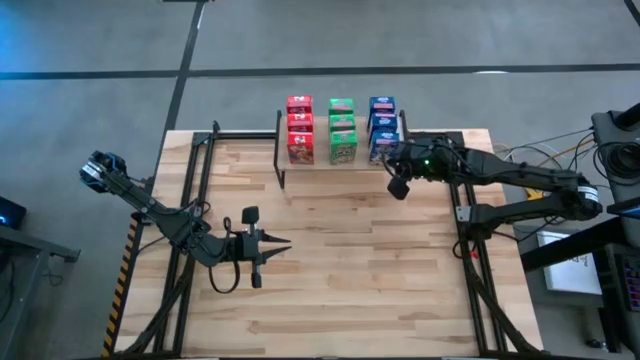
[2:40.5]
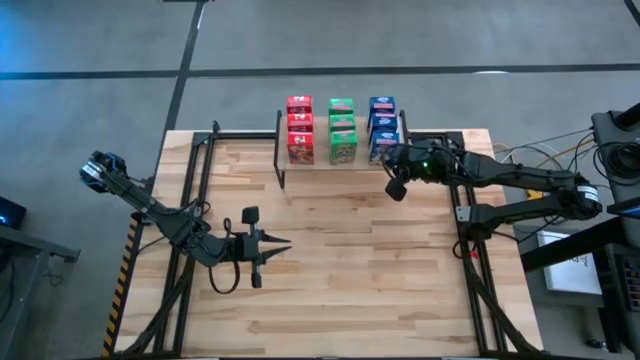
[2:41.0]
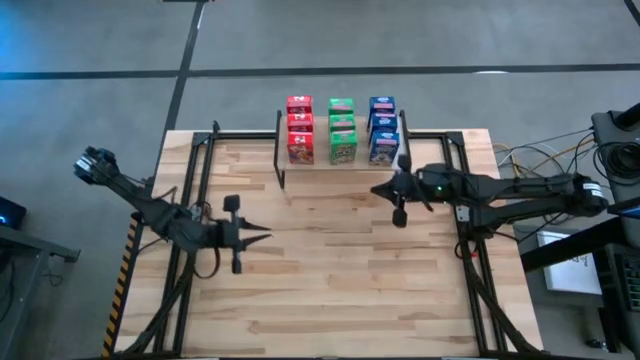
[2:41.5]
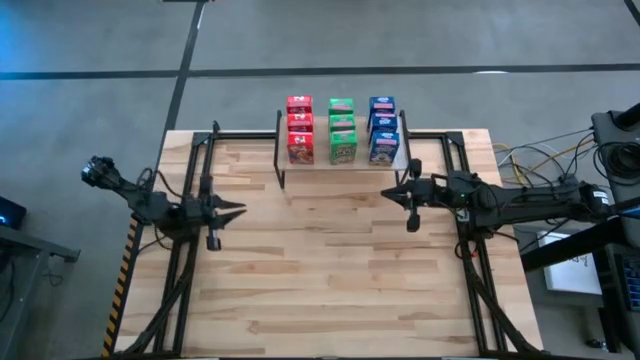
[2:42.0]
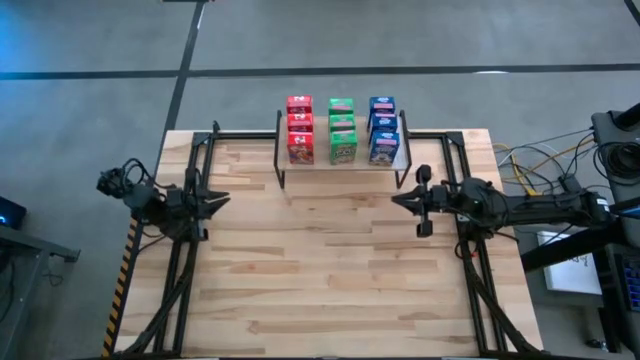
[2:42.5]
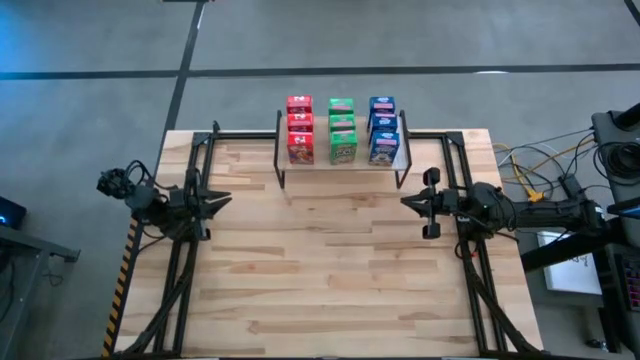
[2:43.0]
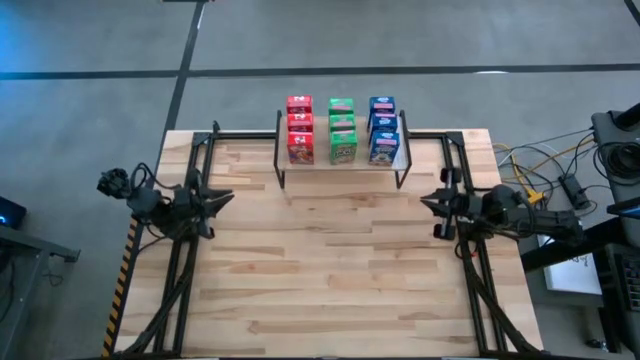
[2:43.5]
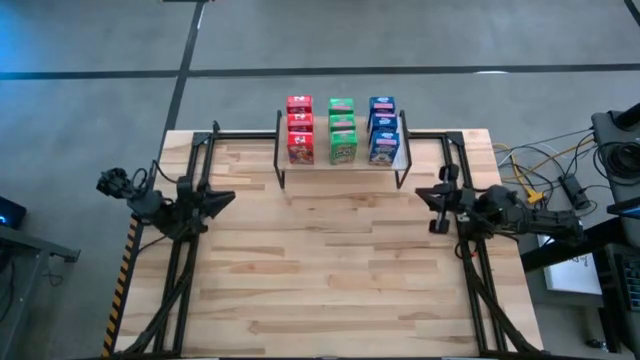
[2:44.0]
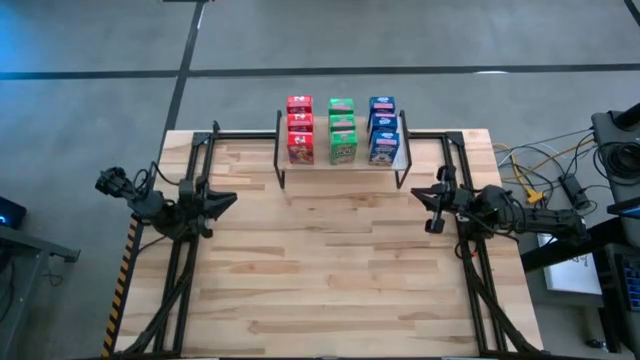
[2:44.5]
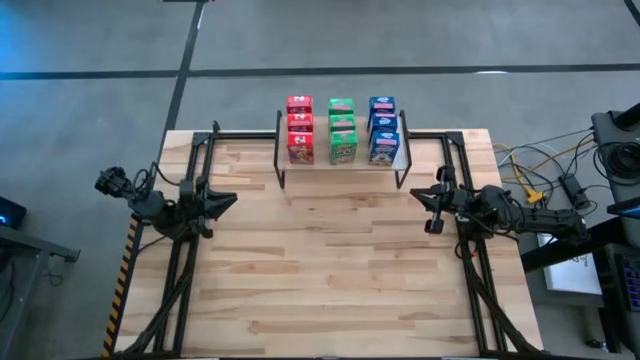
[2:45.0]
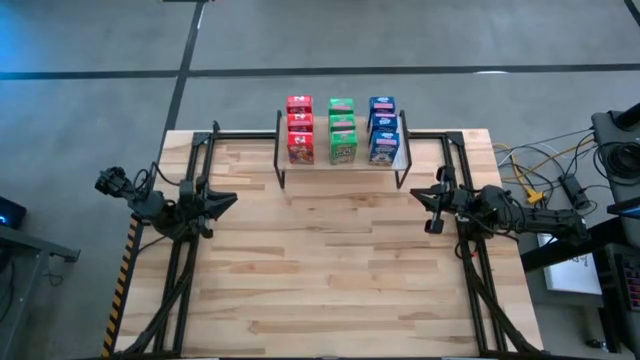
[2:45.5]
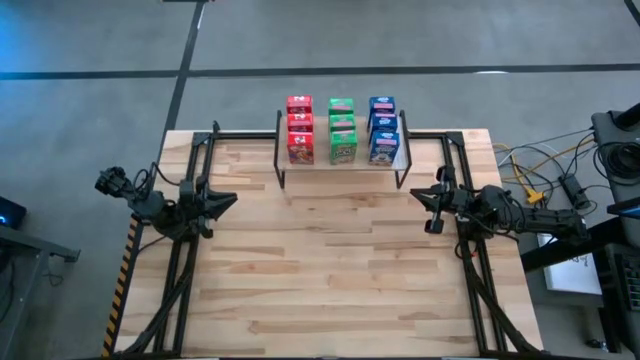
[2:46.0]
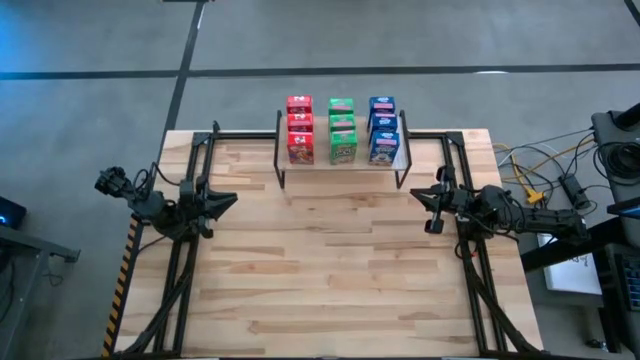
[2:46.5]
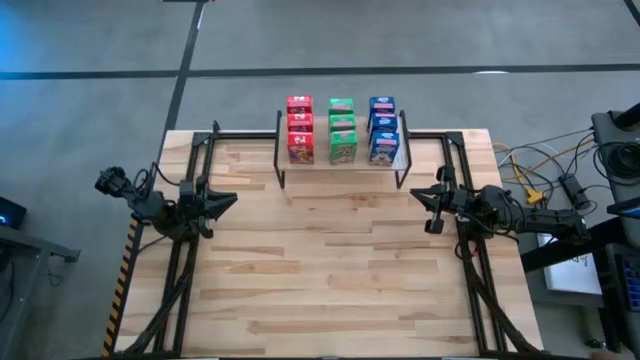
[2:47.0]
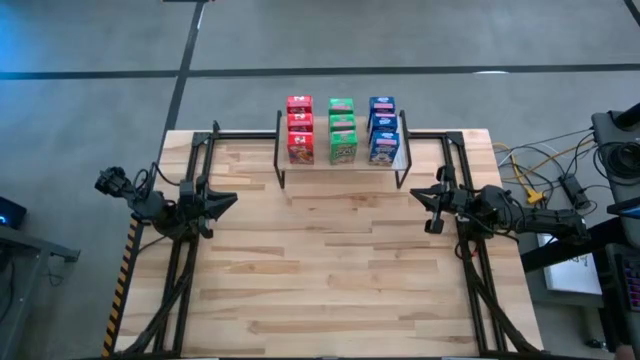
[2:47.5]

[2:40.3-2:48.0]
Task: Stack cereal on shelf
Return to Home Position

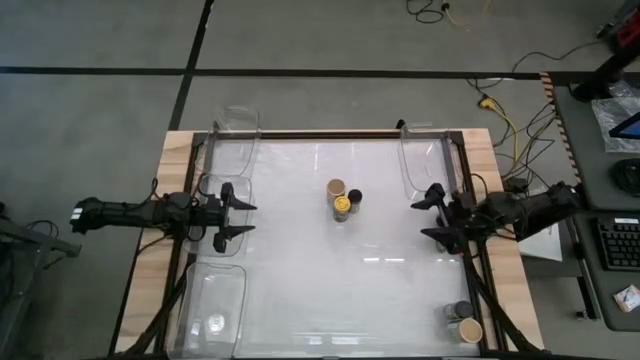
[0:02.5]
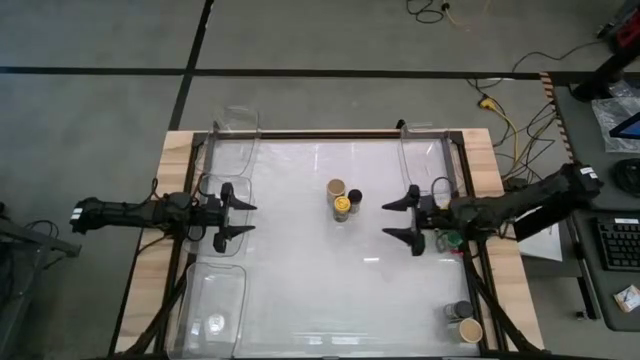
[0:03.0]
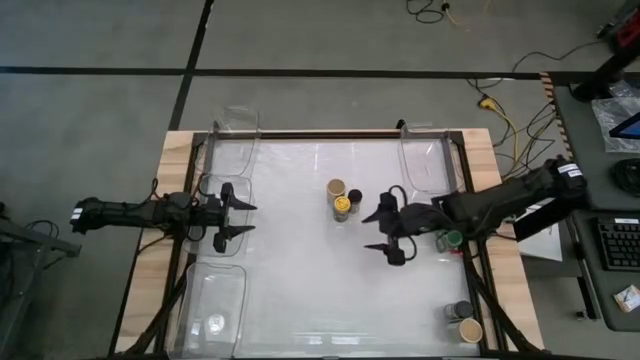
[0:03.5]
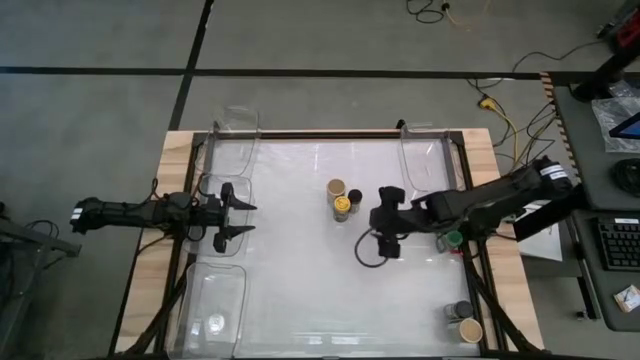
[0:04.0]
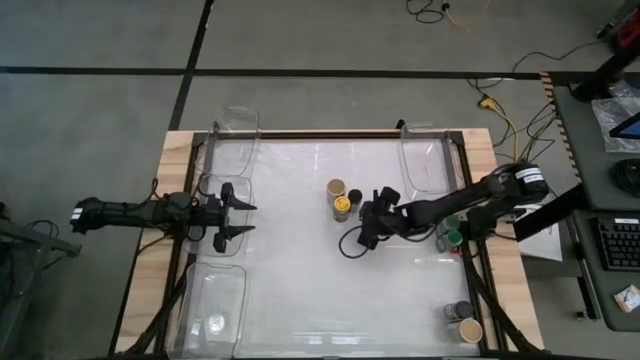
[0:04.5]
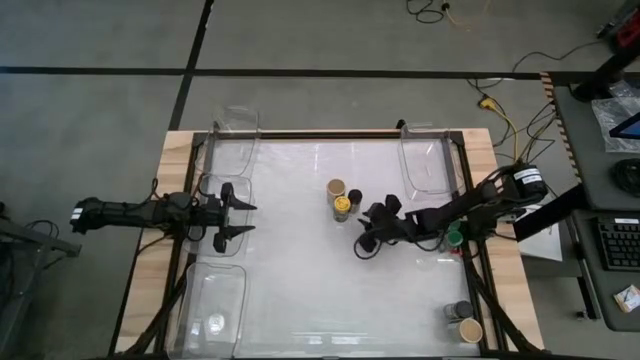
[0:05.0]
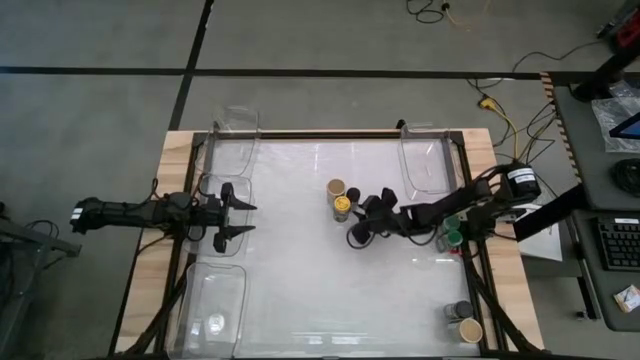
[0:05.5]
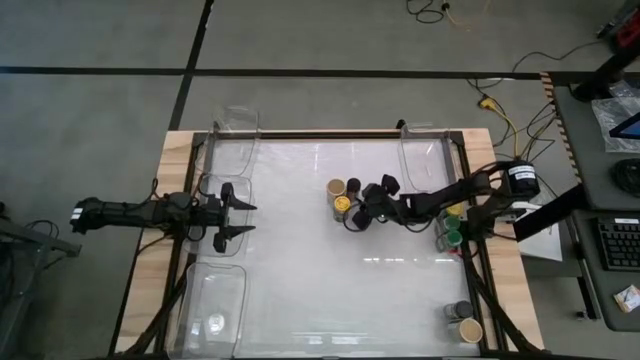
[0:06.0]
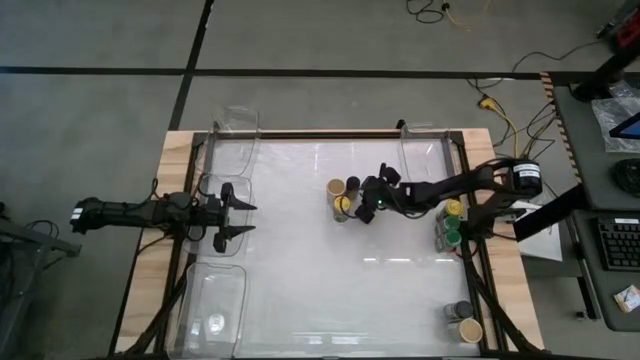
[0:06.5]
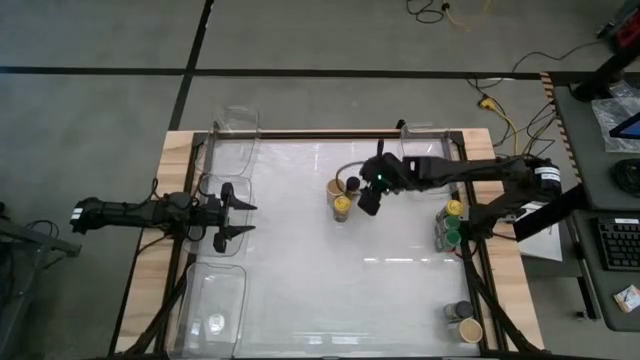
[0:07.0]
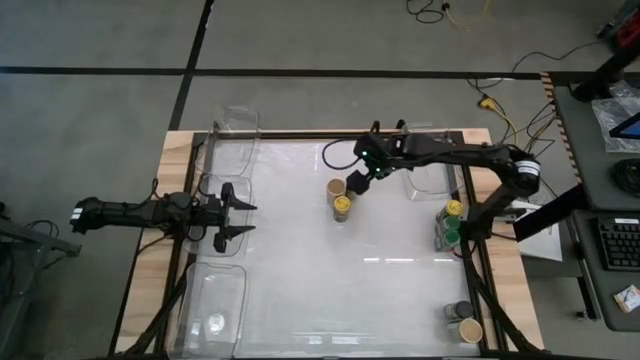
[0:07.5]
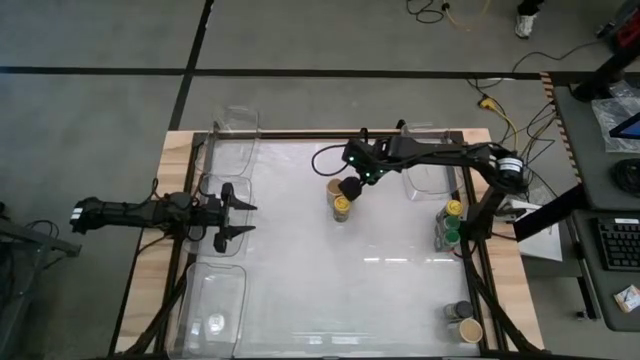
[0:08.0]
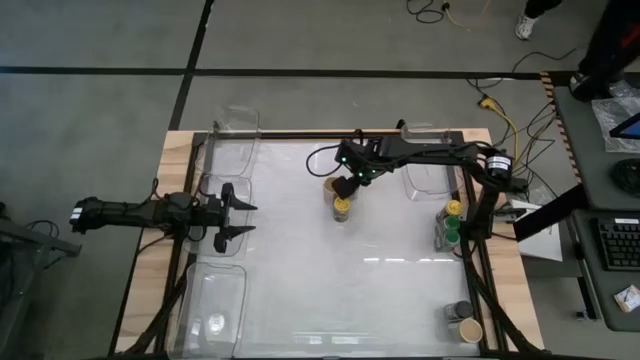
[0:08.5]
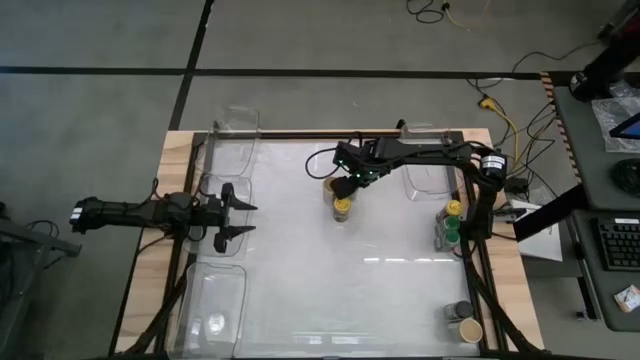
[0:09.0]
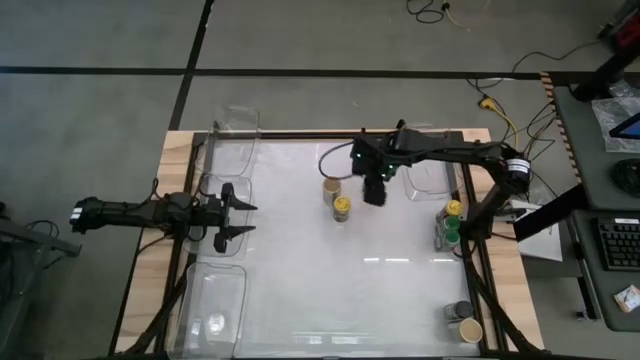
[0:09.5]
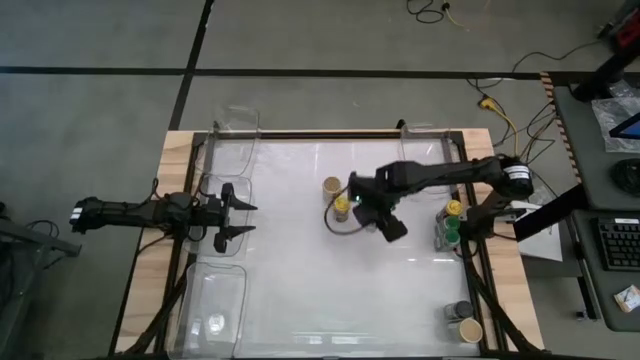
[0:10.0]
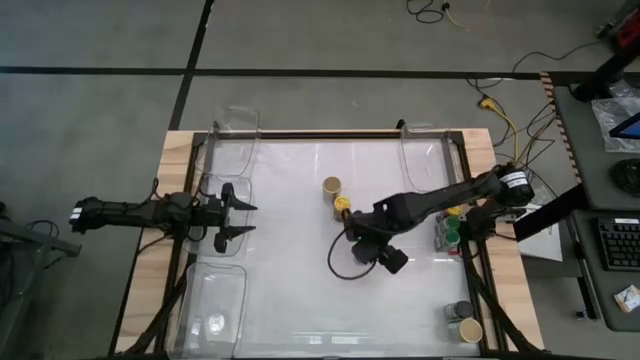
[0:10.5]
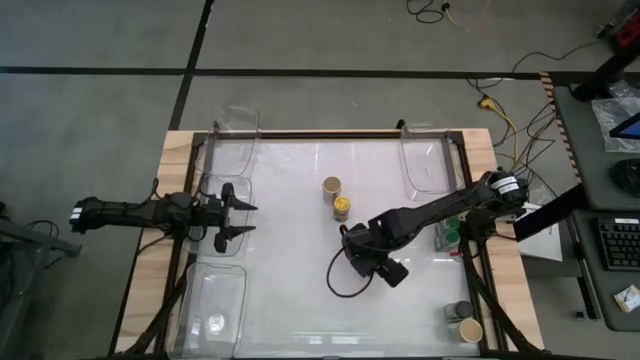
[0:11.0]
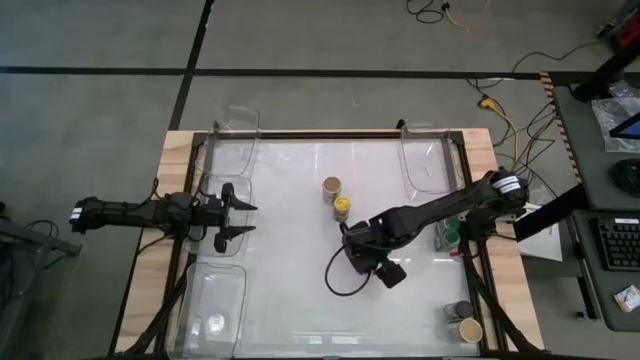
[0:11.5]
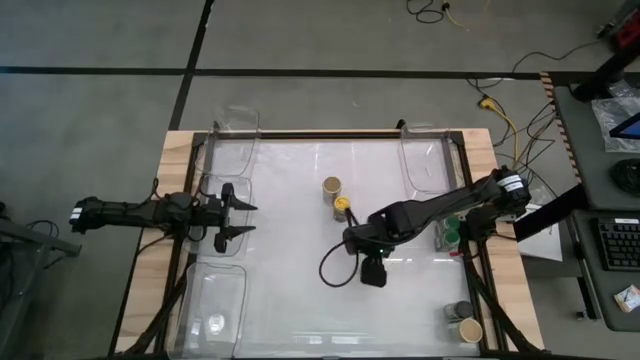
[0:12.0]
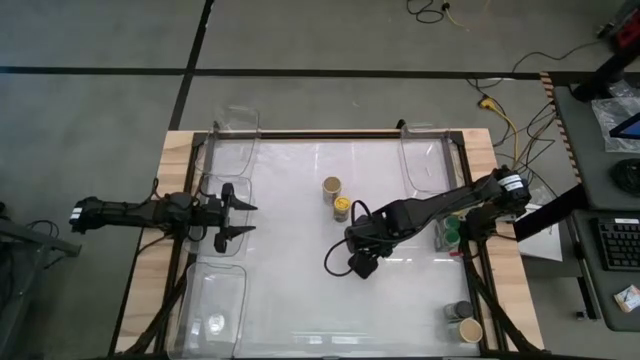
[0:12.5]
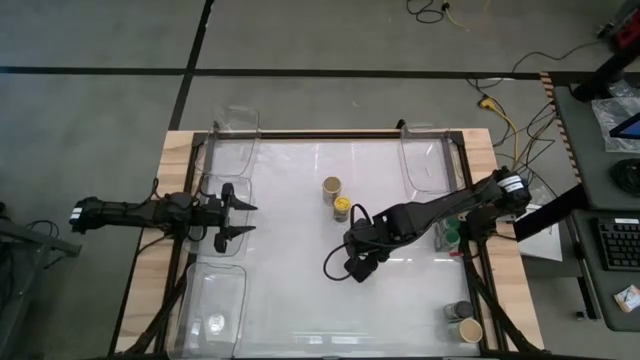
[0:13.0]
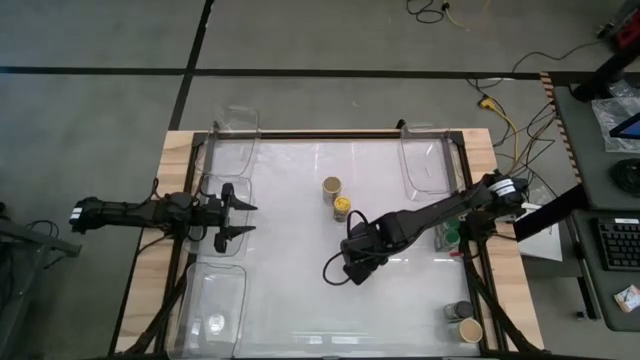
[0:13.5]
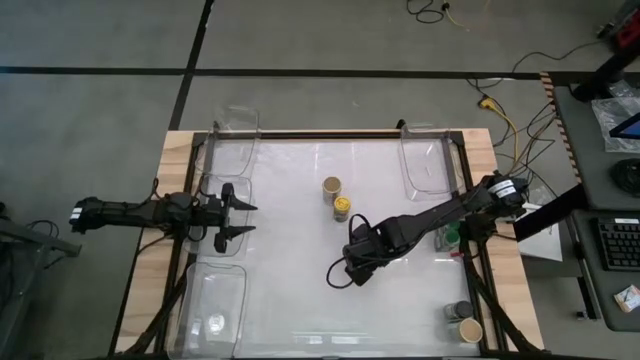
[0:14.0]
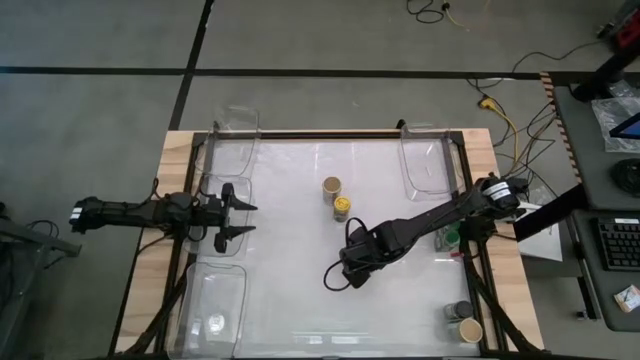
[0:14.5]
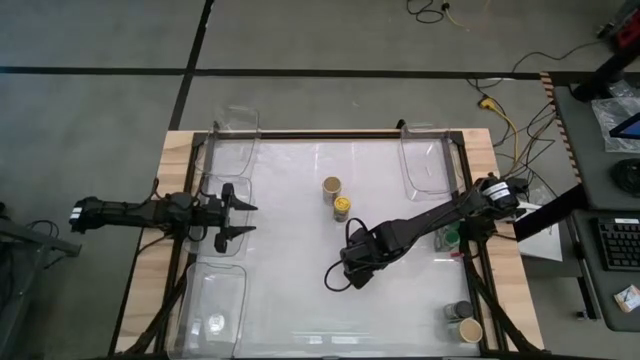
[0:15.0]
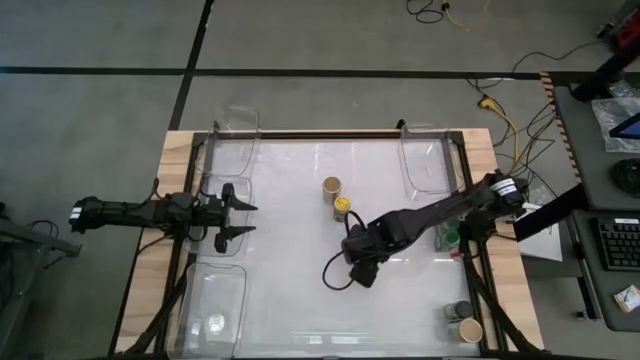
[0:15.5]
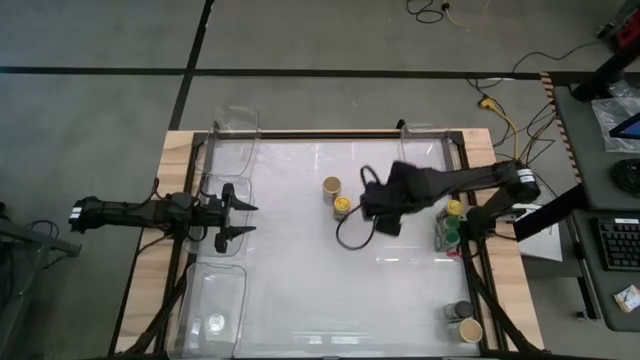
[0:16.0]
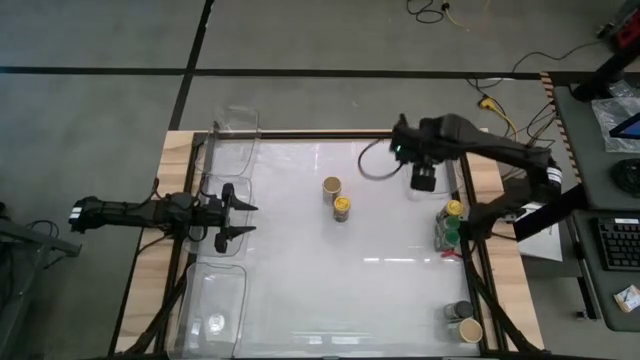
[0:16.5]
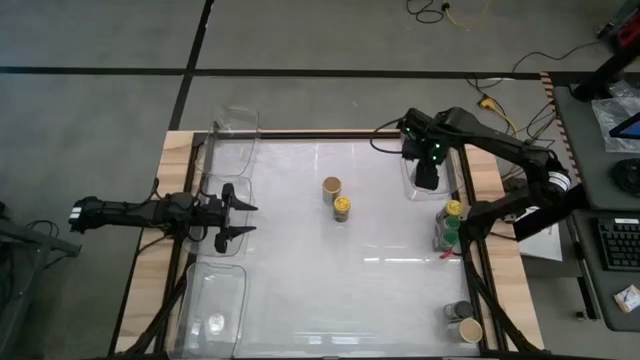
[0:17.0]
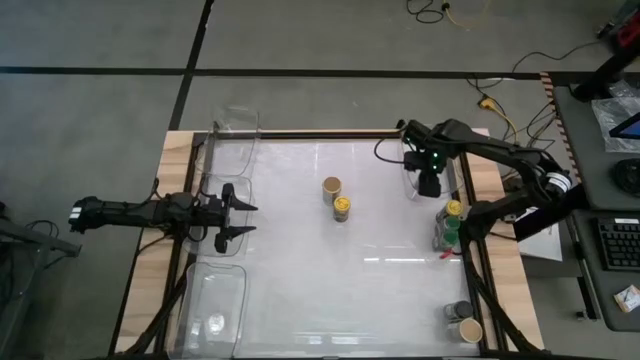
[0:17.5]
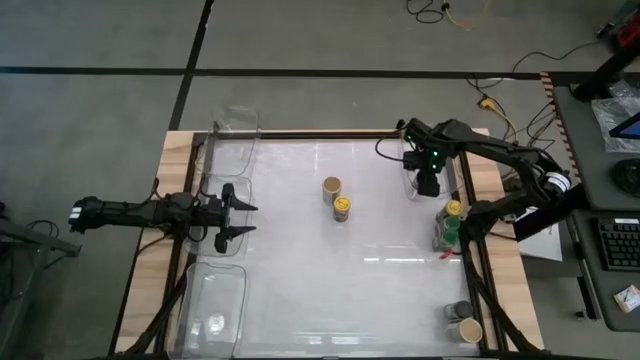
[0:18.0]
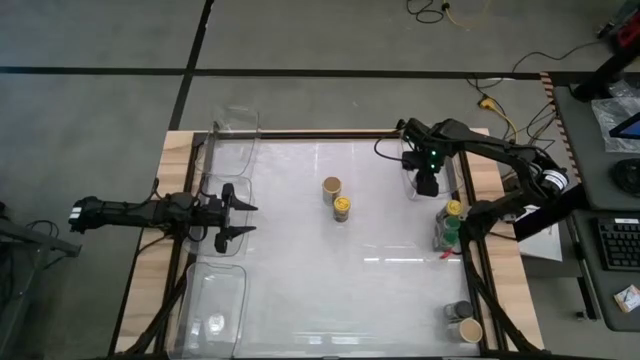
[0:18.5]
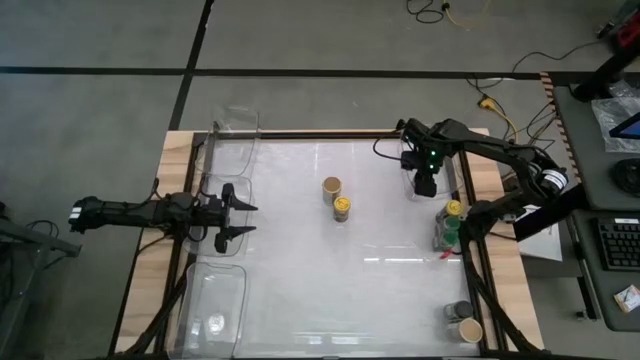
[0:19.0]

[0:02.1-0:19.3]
Task: Sort spices by type
Move the top black spice bottle to the middle of the table
